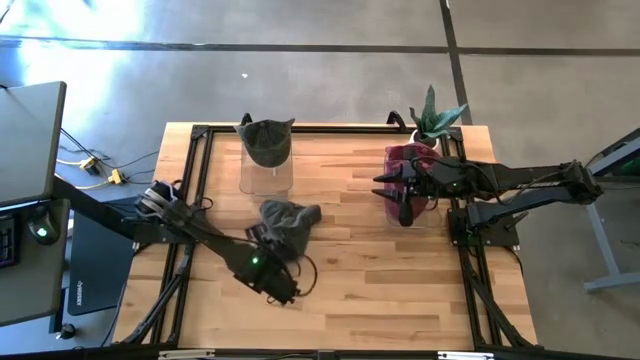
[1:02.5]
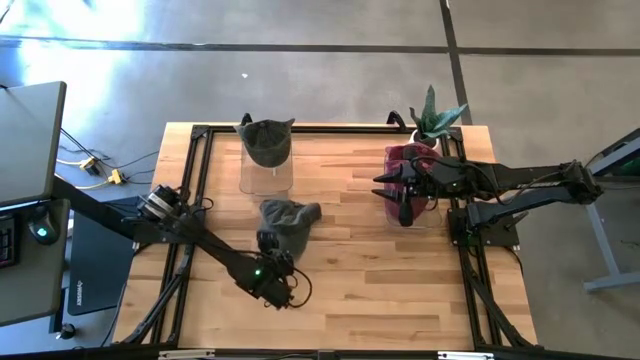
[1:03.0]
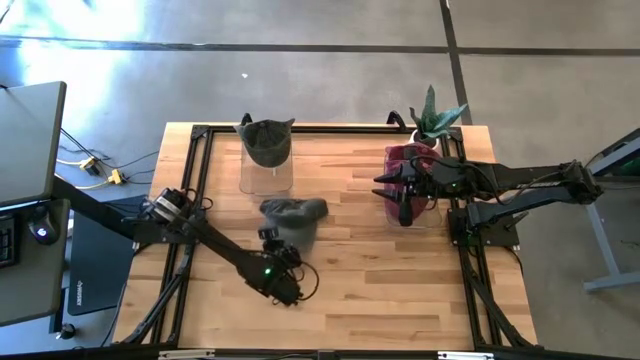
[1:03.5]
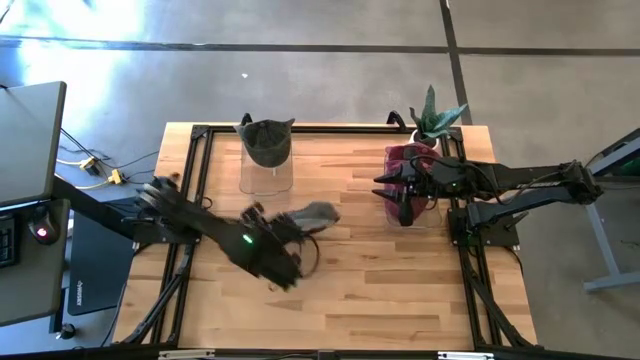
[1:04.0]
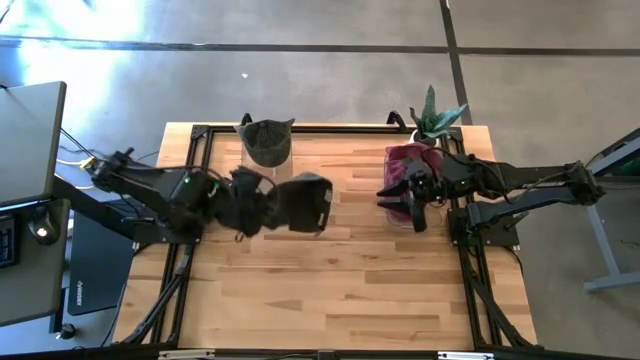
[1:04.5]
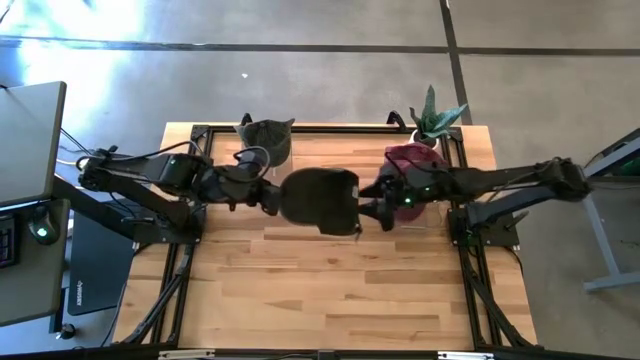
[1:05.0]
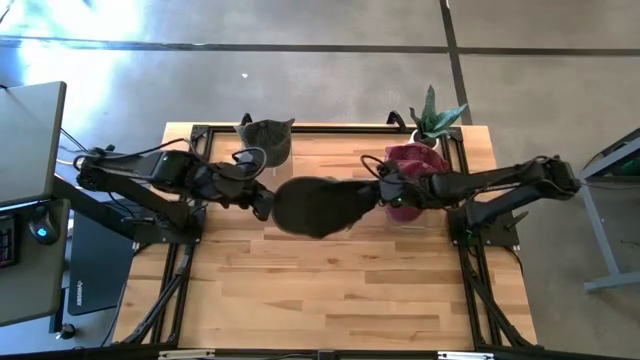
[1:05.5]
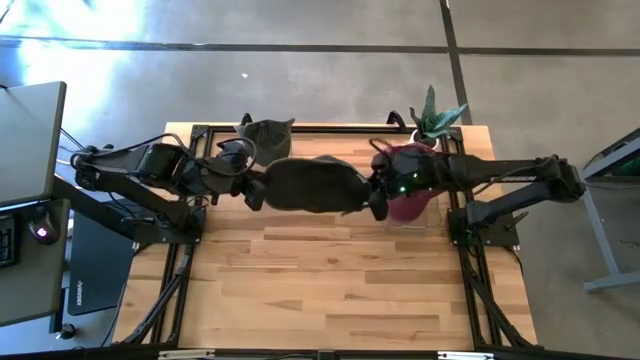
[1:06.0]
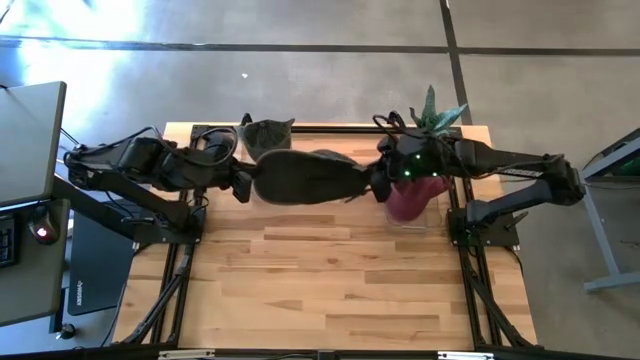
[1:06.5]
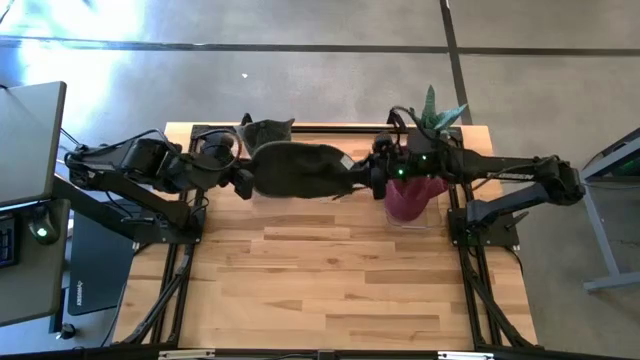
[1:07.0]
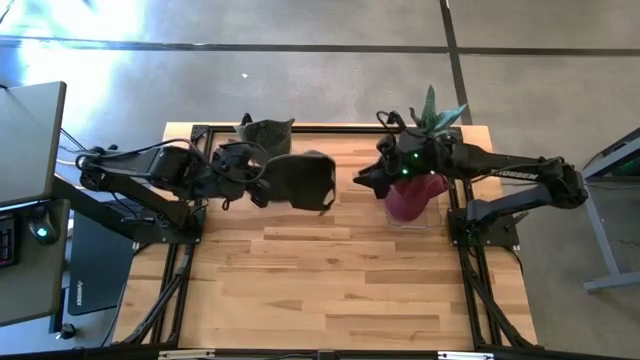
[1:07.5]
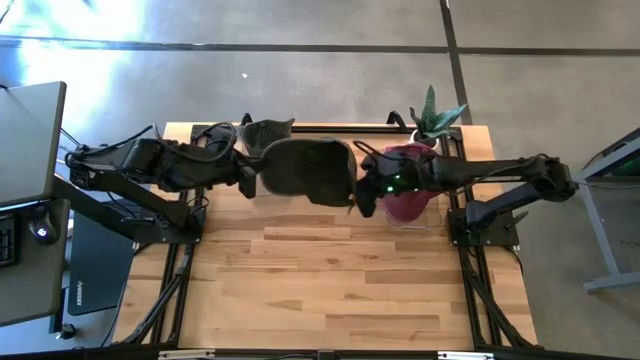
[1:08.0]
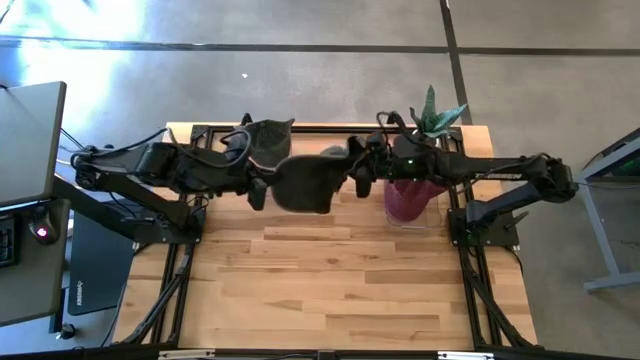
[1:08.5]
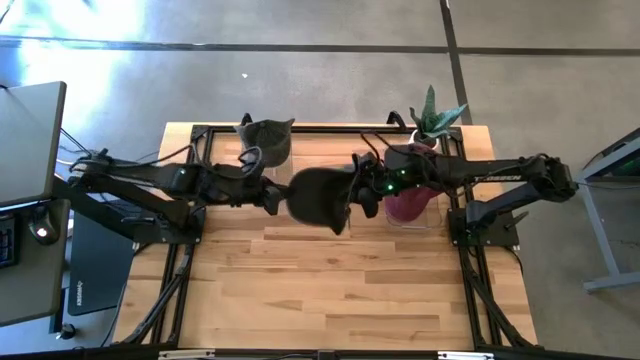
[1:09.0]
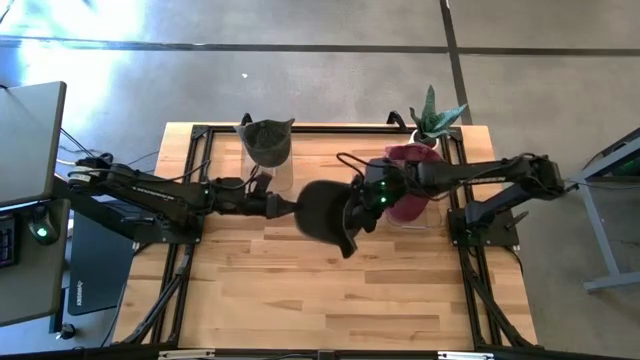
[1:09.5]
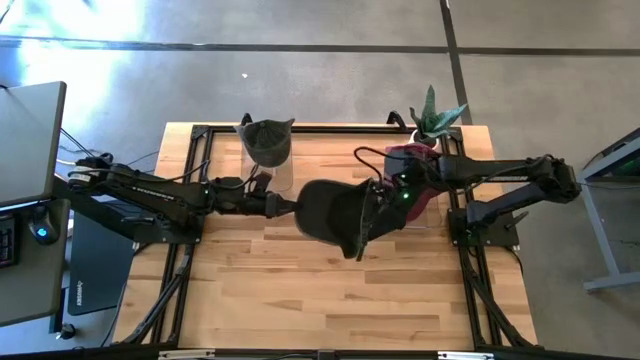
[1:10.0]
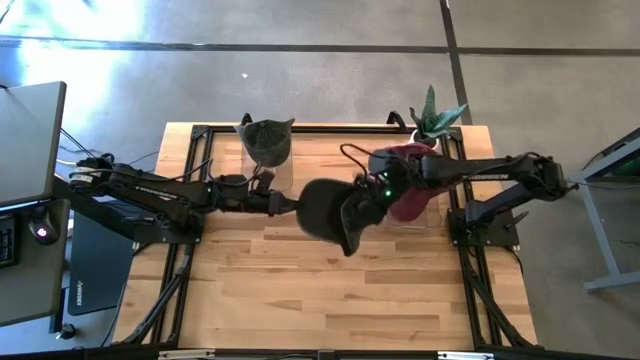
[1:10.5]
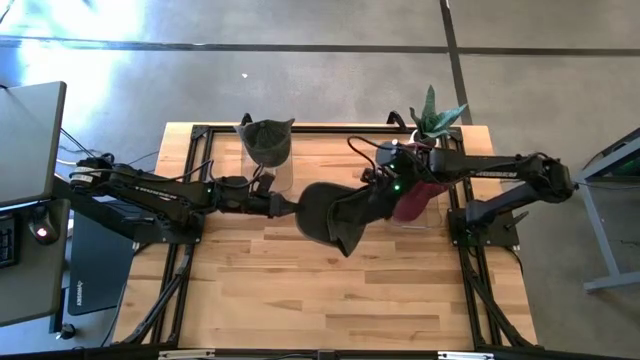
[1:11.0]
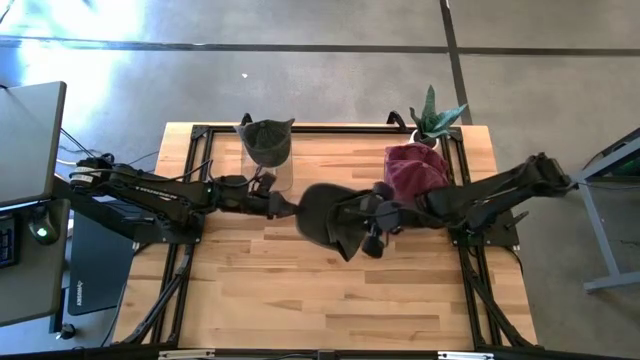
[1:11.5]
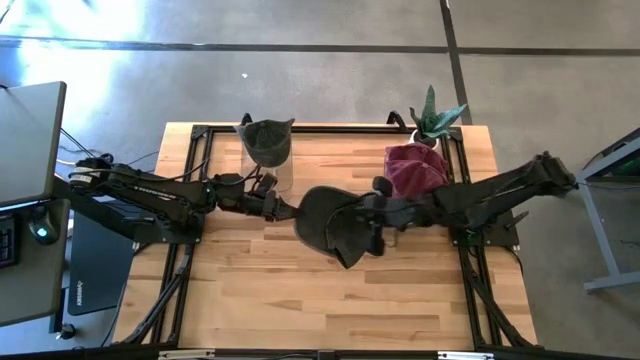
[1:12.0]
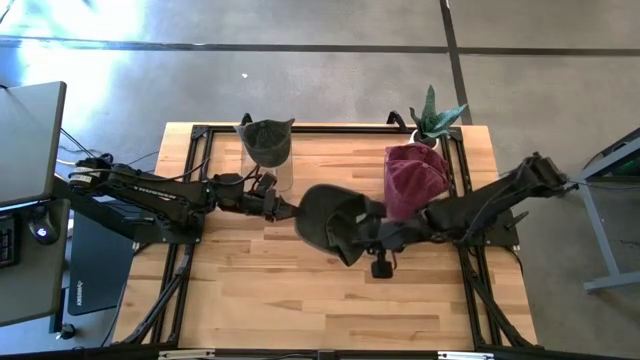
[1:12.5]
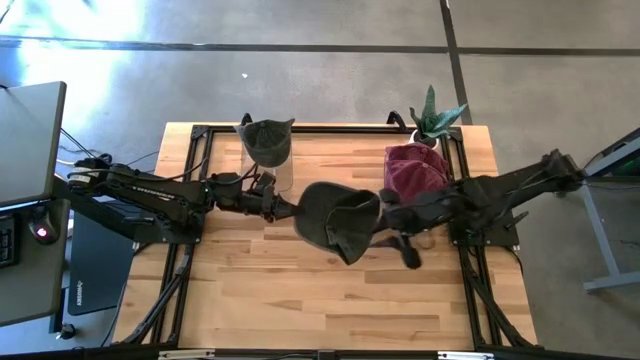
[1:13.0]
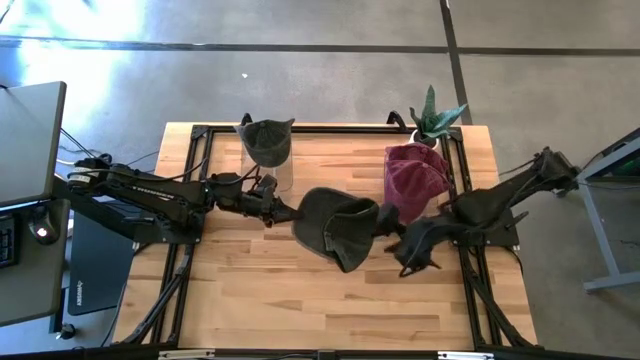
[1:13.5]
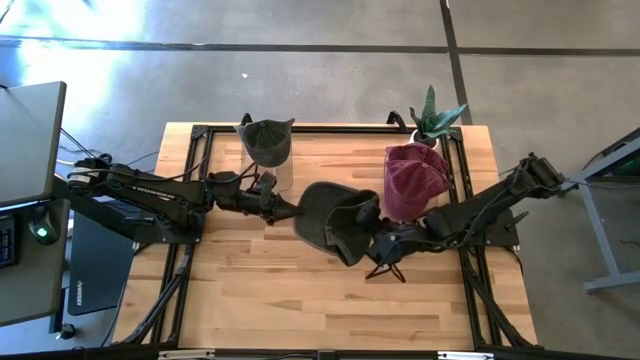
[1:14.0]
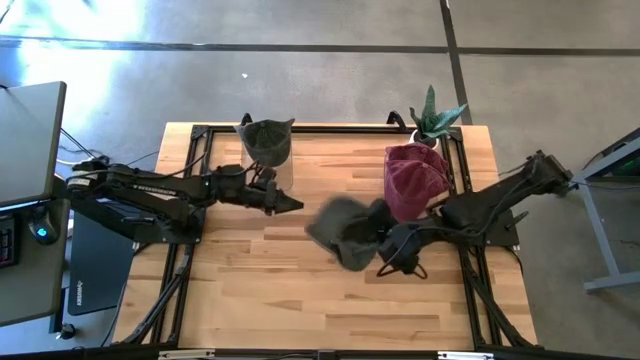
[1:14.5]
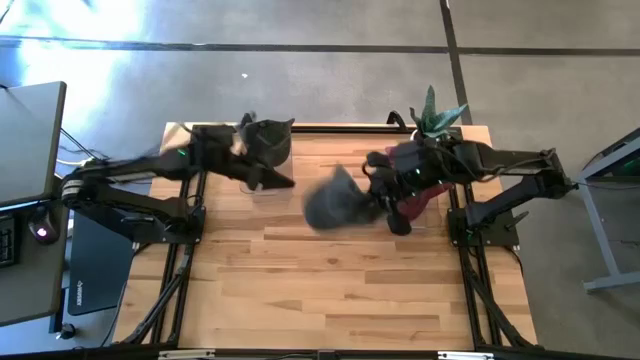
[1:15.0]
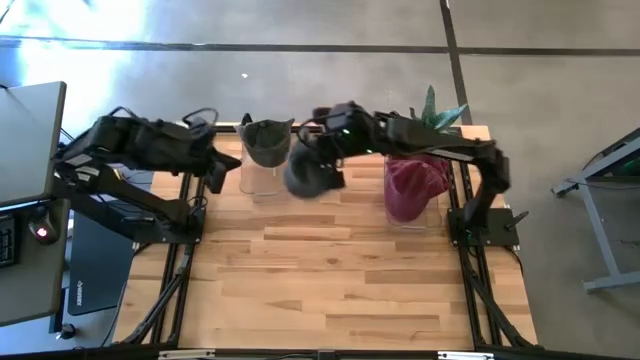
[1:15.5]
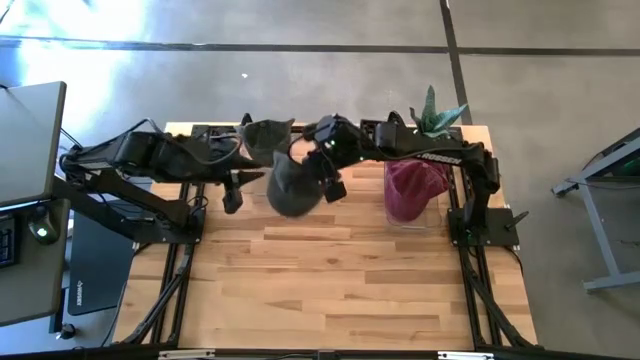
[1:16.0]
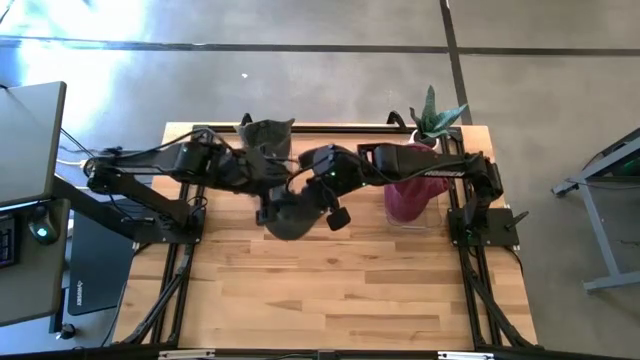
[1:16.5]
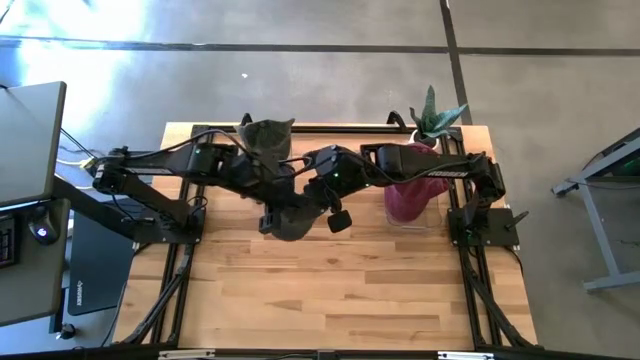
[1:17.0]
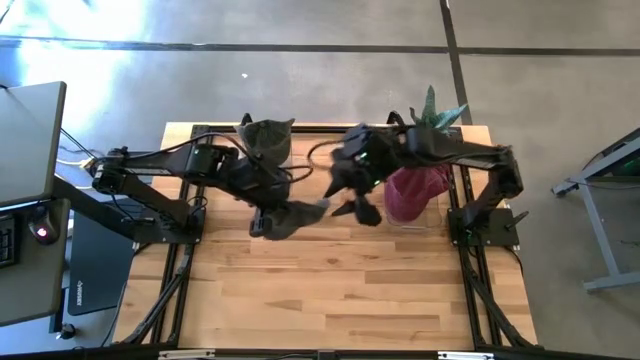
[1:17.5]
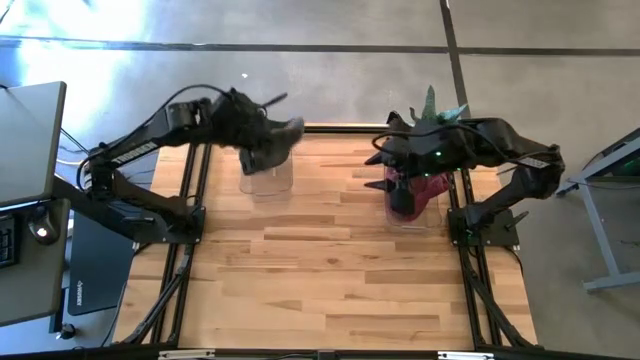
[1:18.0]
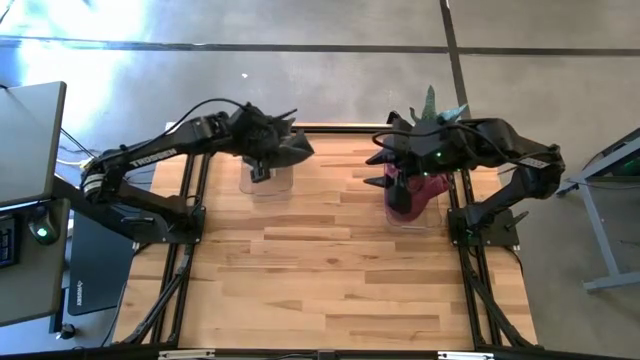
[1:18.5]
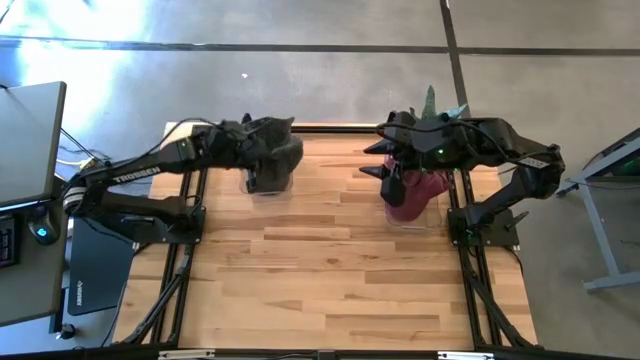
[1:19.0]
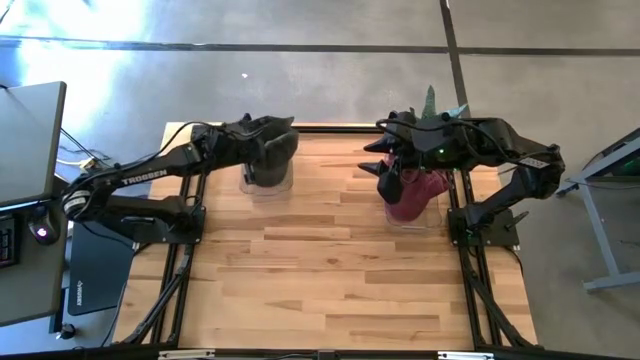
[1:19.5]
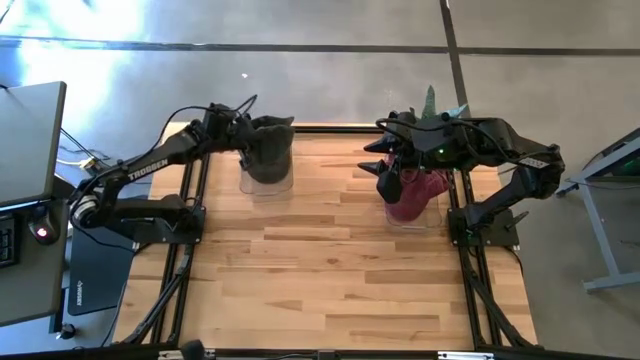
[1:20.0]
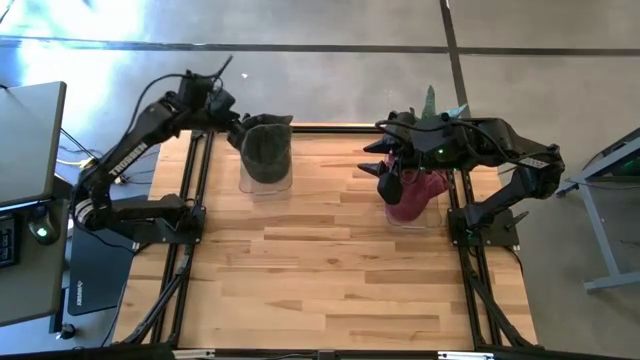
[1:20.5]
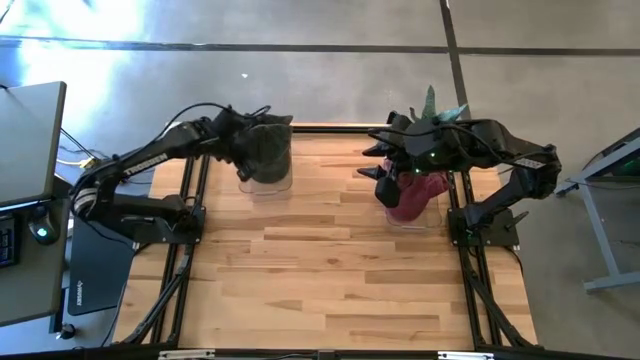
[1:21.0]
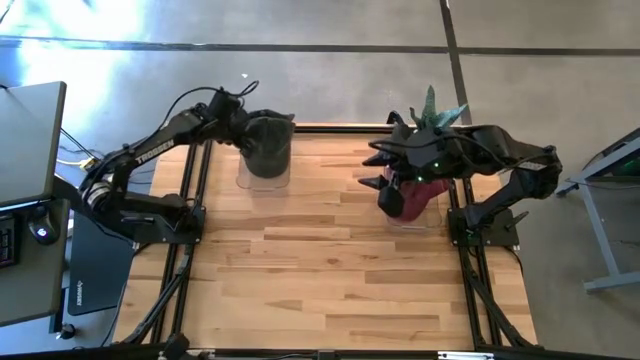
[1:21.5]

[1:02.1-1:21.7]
Task: Pick & Place hat
Put the green cap into the left transparent bin
